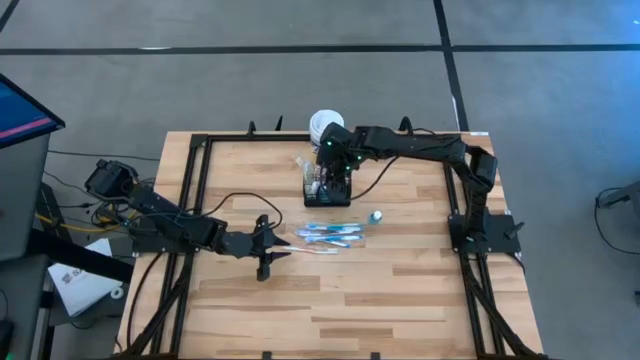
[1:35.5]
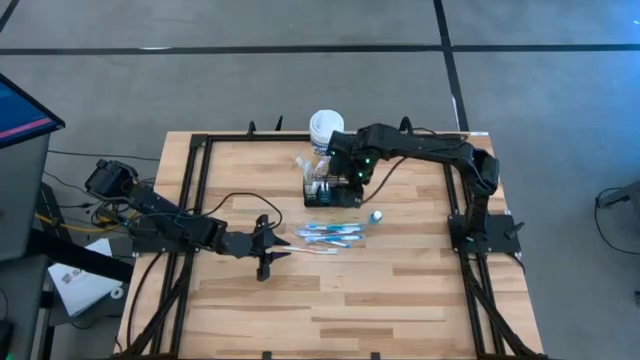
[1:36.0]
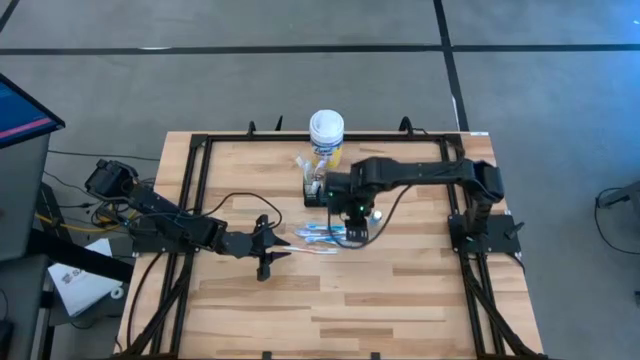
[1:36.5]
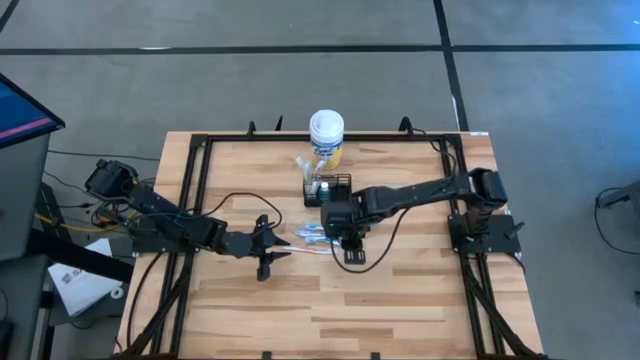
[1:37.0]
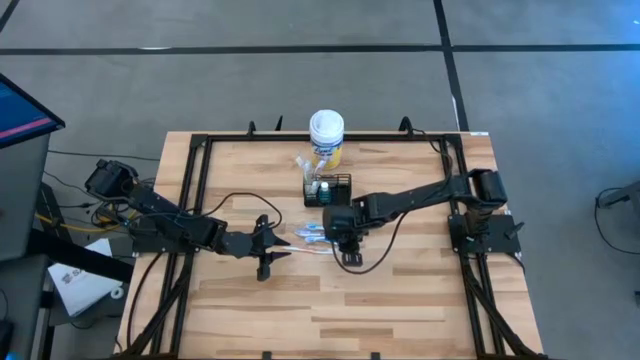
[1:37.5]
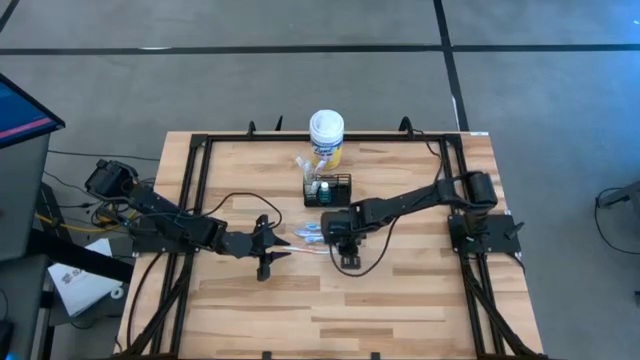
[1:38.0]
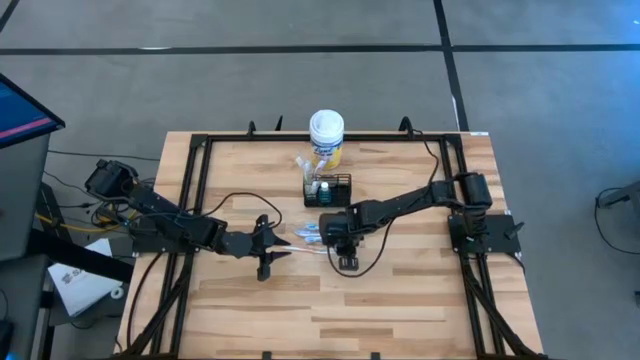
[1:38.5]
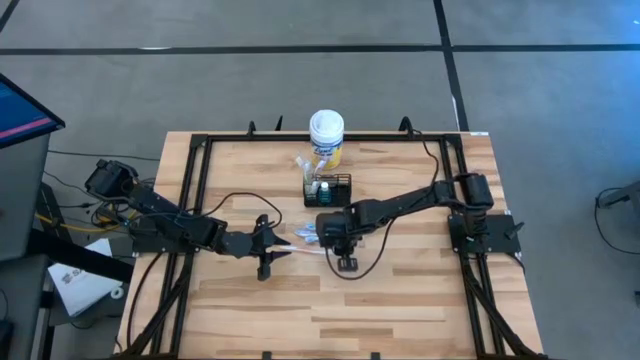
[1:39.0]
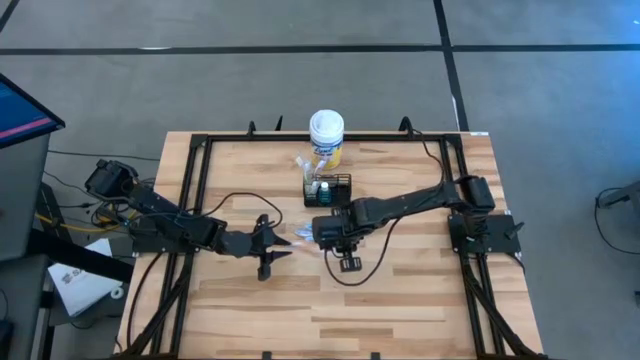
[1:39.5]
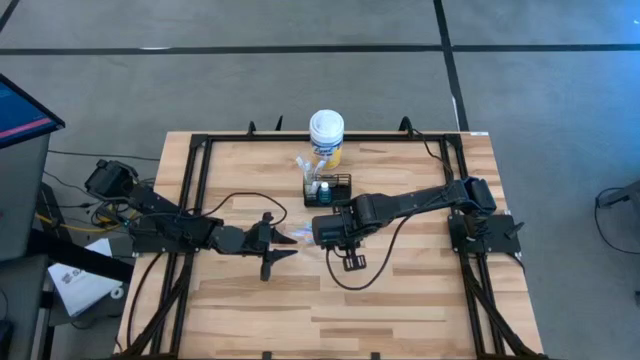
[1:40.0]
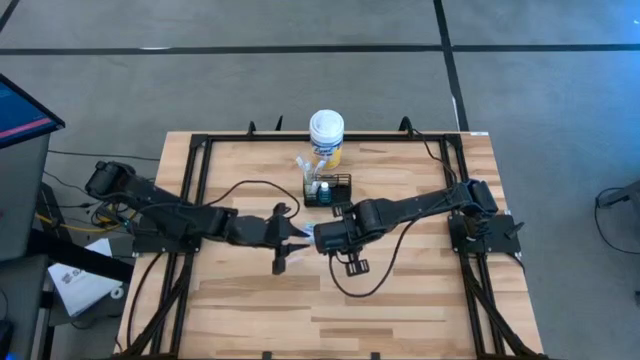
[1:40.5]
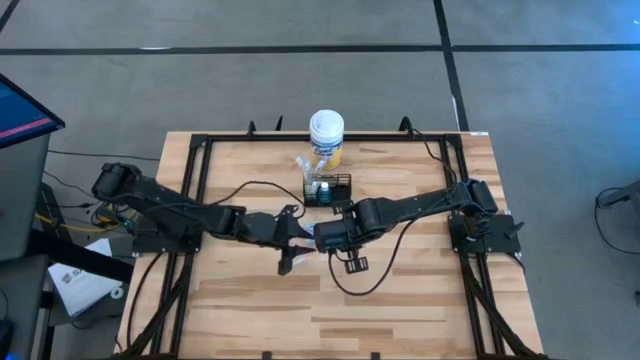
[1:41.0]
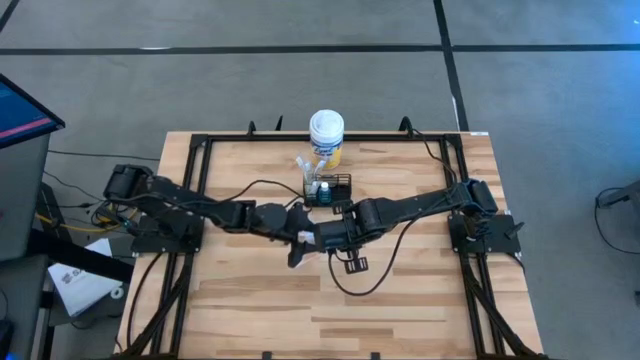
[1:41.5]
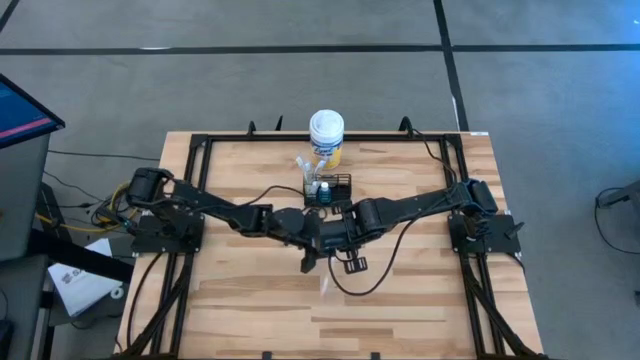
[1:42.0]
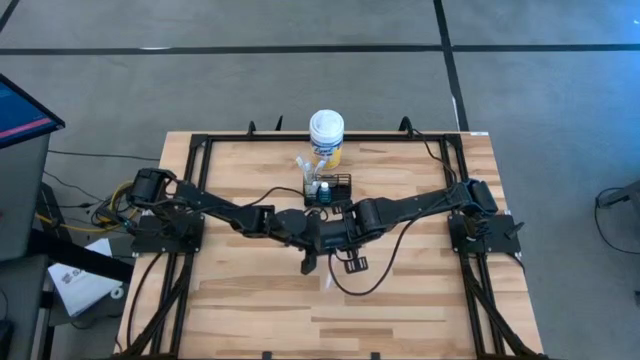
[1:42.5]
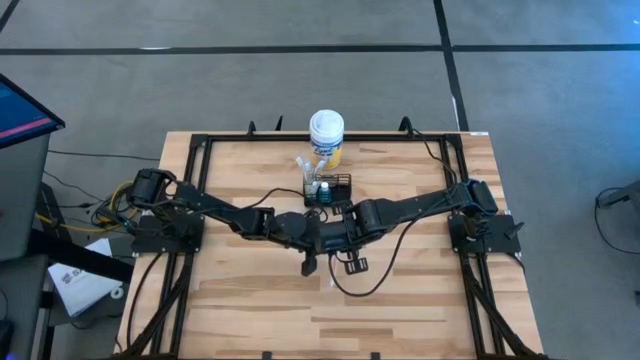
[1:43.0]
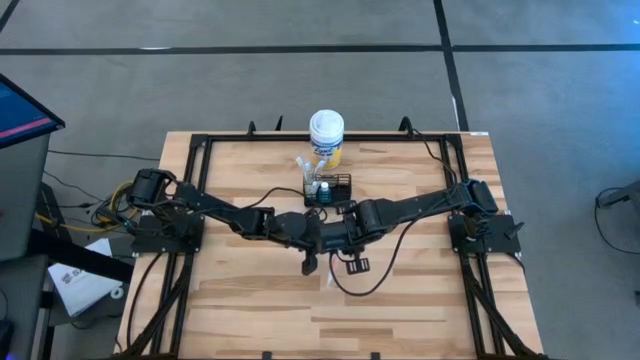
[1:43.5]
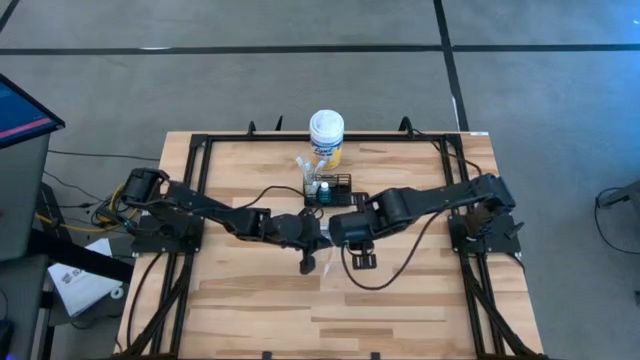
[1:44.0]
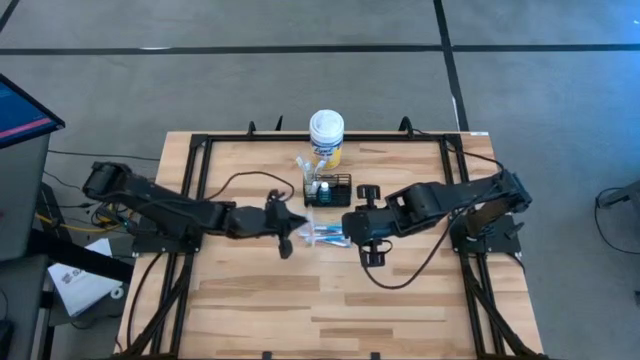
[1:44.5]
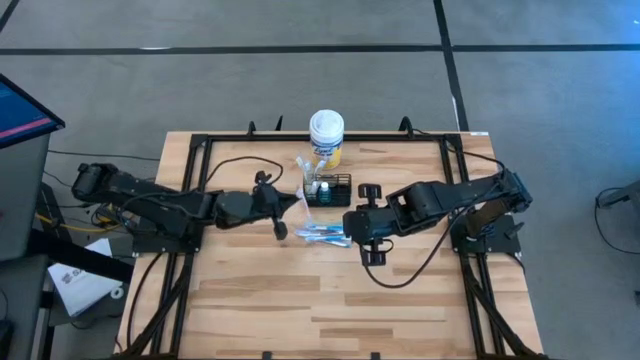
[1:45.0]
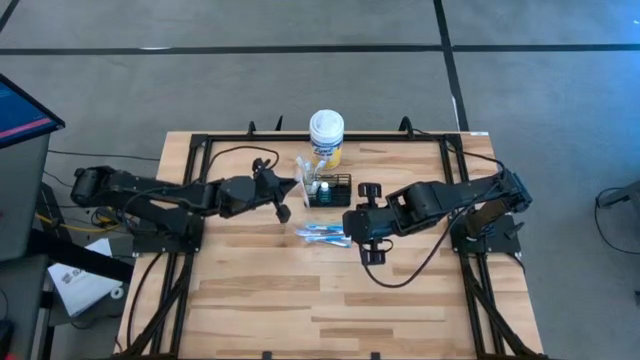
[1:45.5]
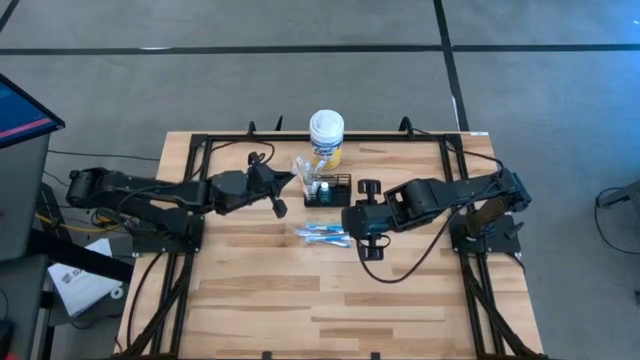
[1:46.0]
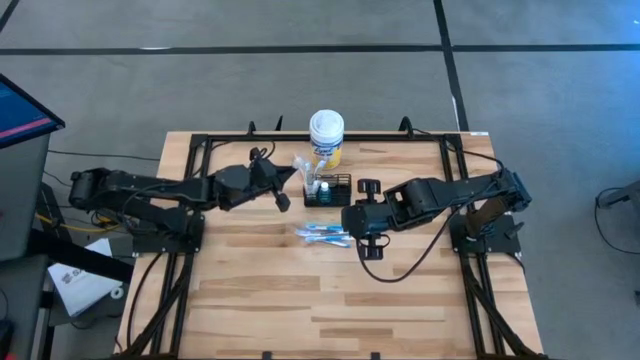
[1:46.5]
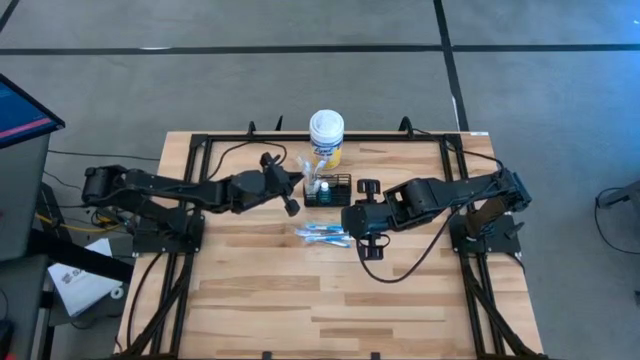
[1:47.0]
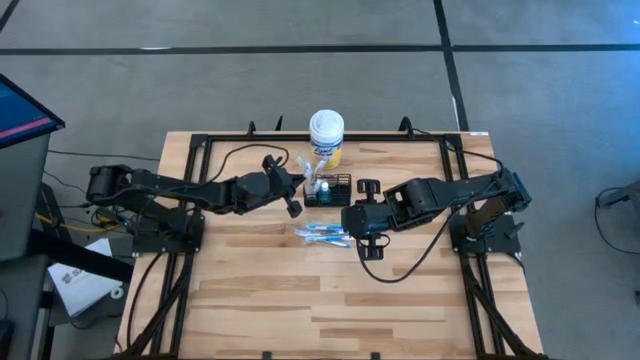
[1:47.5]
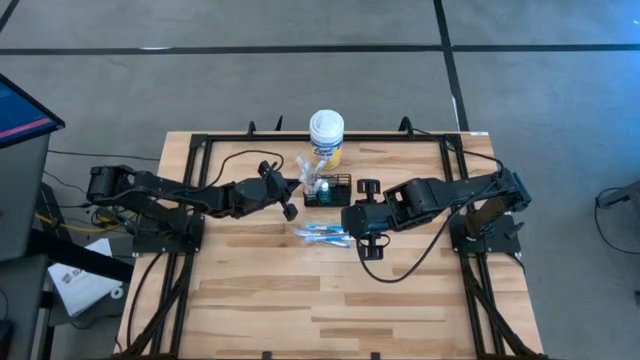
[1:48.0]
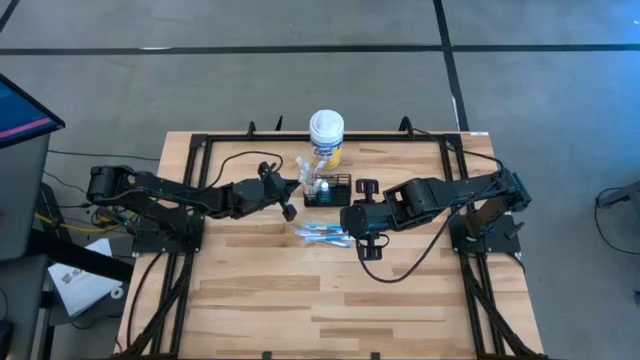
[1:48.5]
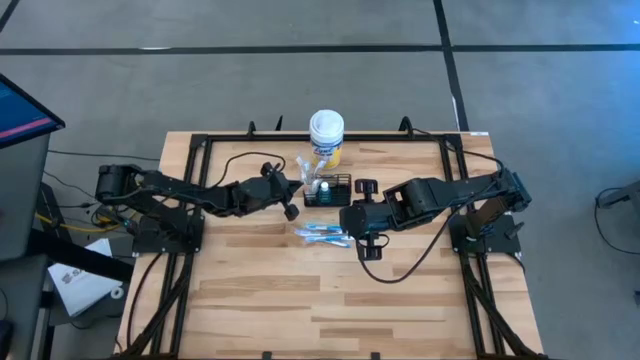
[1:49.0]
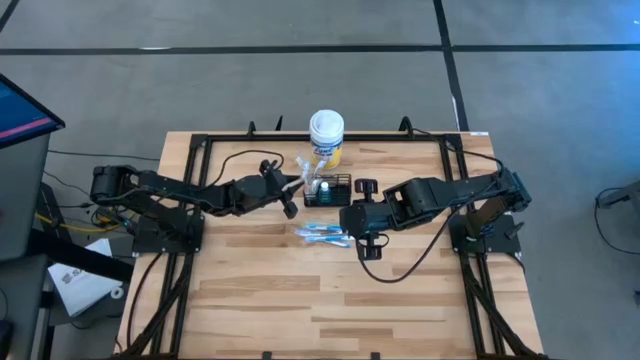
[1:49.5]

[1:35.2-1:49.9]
Task: Pick & Place toothbrushing station
Put the orange toothbrush into the black wire organizer

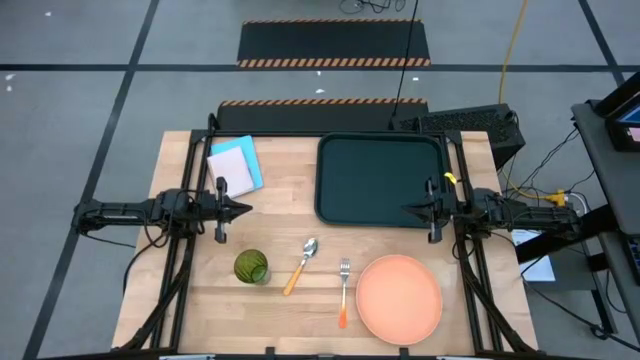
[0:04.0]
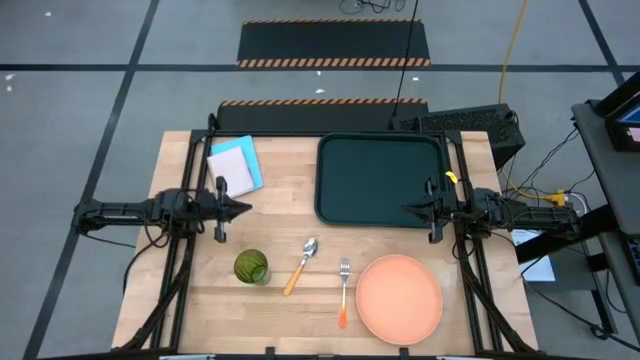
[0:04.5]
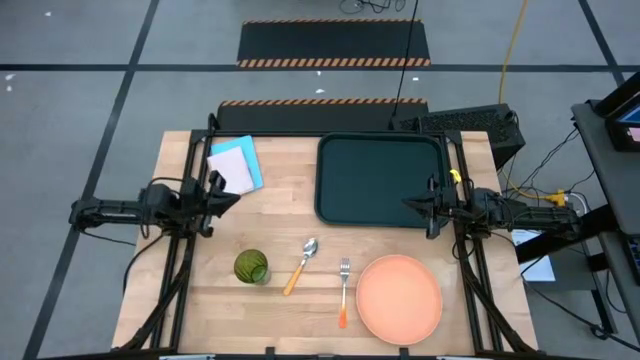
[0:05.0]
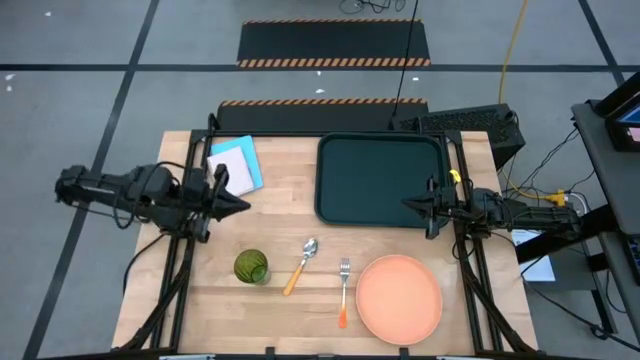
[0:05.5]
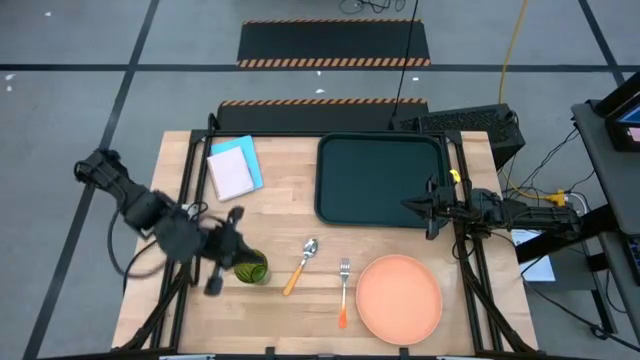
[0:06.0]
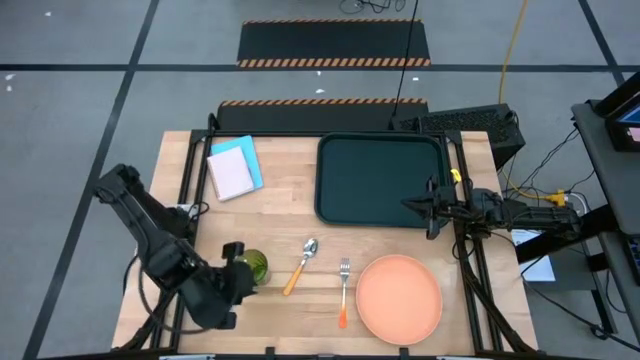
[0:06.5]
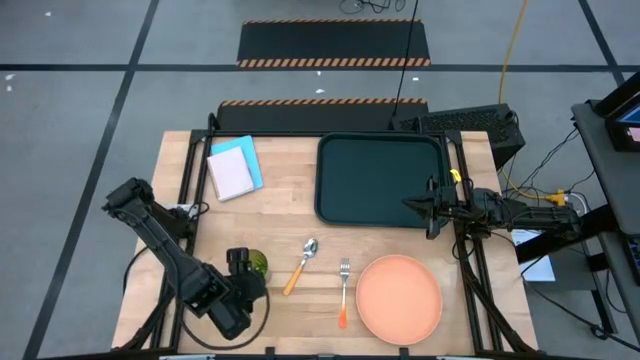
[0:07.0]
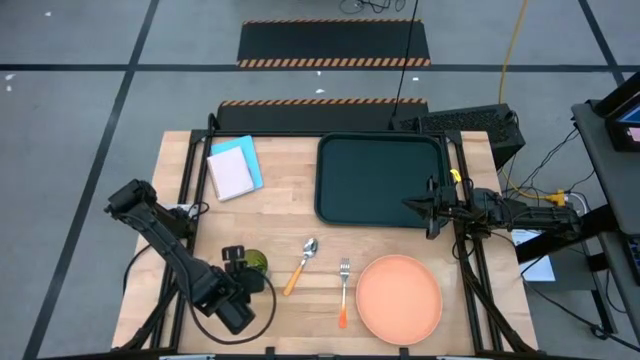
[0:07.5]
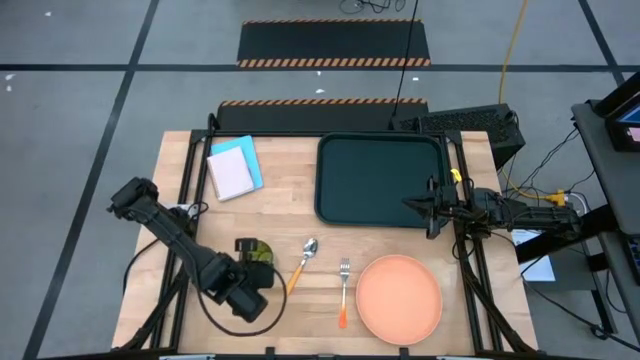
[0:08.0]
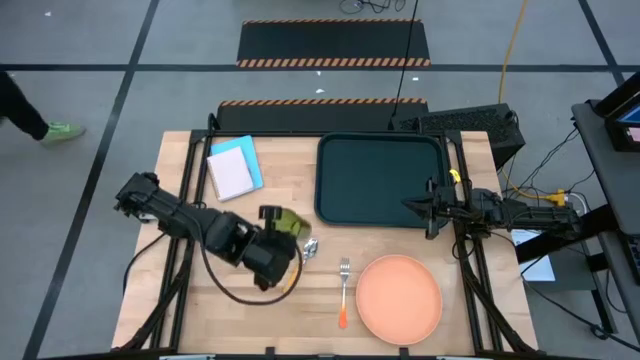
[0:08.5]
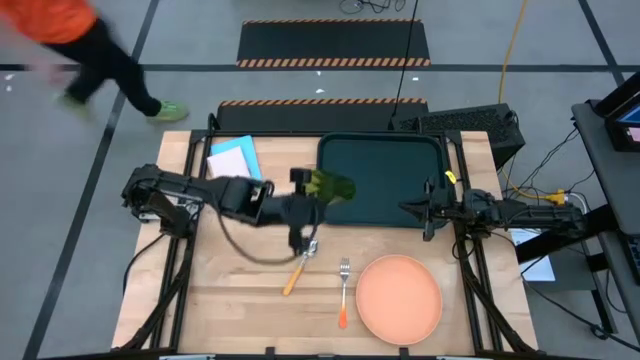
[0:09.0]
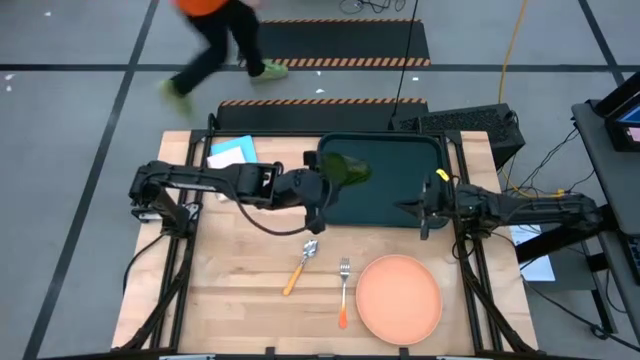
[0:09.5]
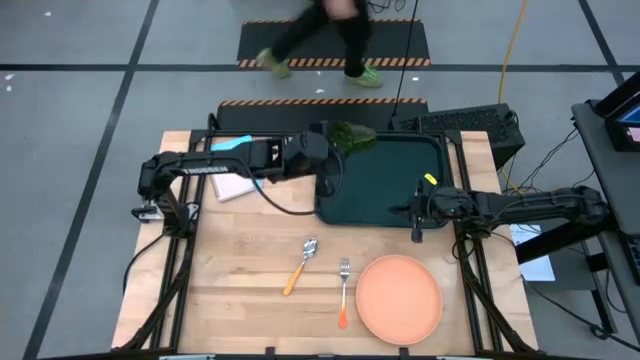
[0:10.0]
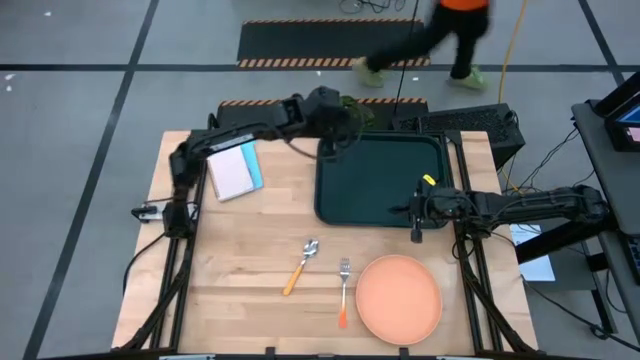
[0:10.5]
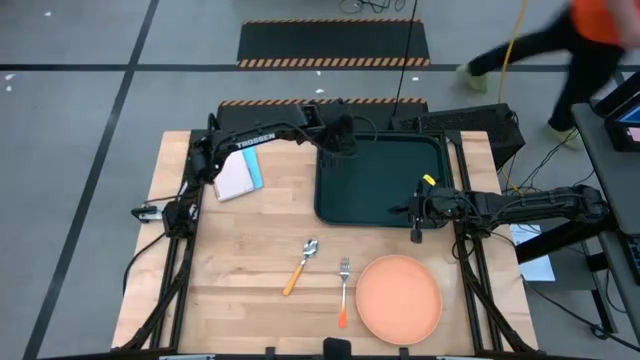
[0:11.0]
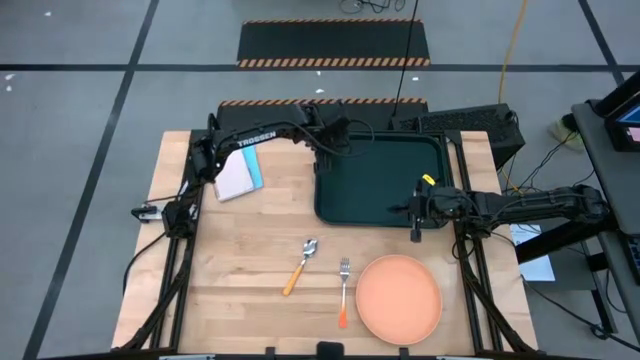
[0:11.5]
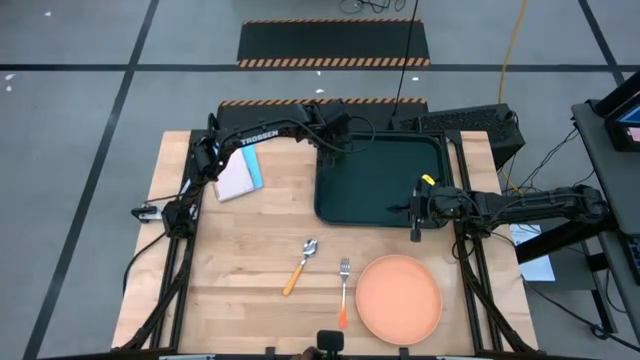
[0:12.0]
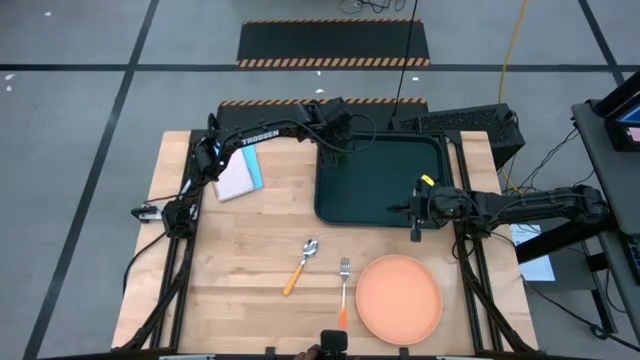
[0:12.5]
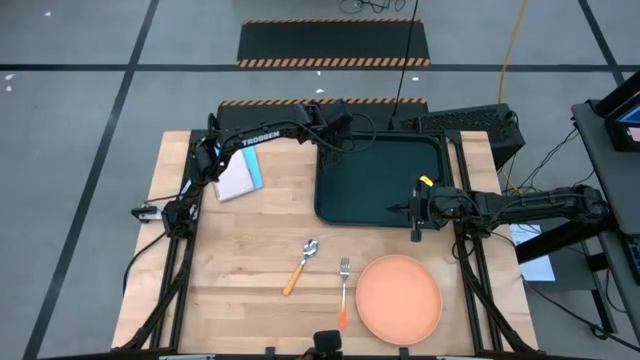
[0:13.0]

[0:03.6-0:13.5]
Task: Pick and place plate/cup/fork/spoon on tray
Put the green cup on the top left of the black tray
